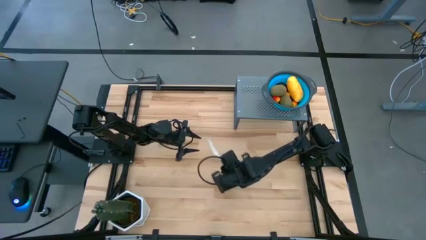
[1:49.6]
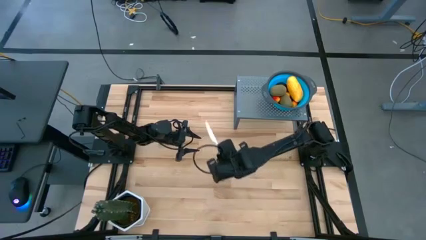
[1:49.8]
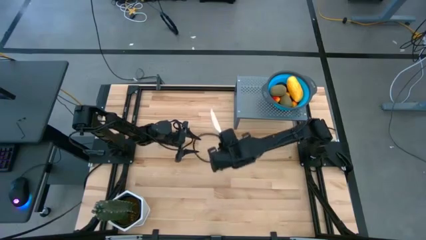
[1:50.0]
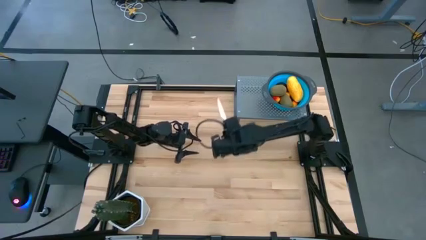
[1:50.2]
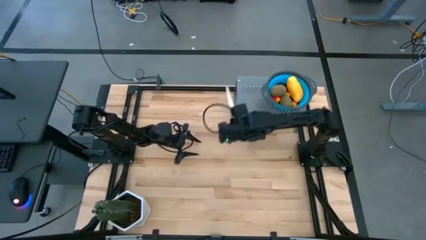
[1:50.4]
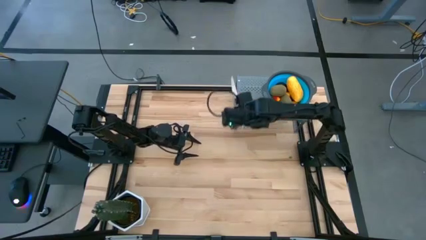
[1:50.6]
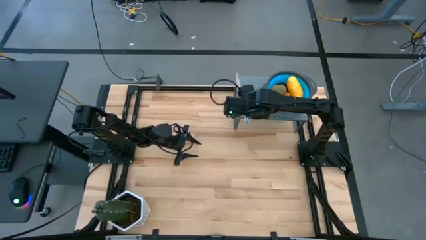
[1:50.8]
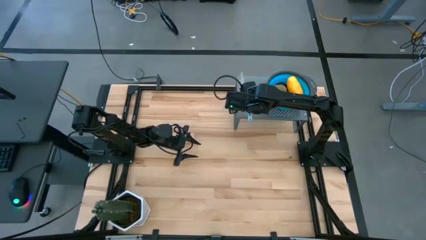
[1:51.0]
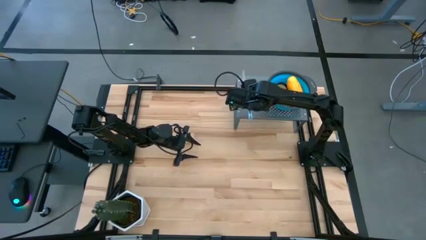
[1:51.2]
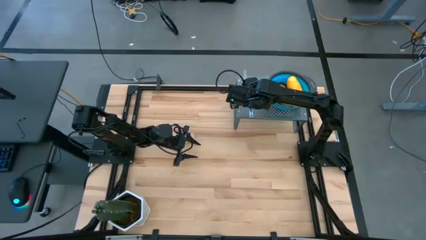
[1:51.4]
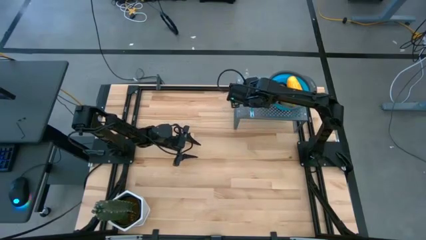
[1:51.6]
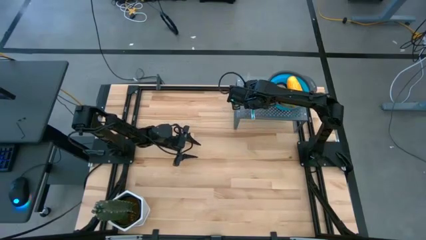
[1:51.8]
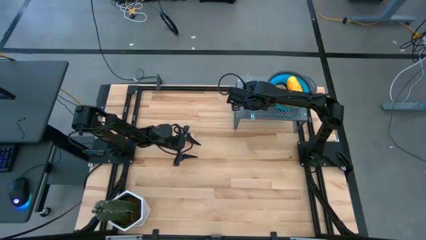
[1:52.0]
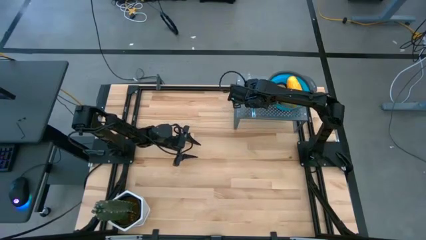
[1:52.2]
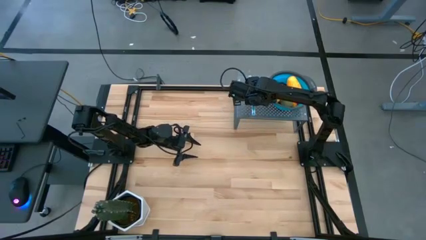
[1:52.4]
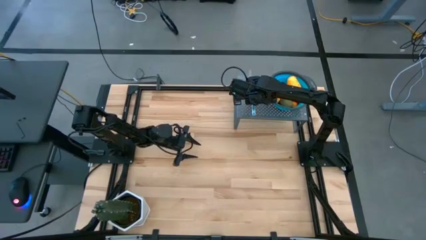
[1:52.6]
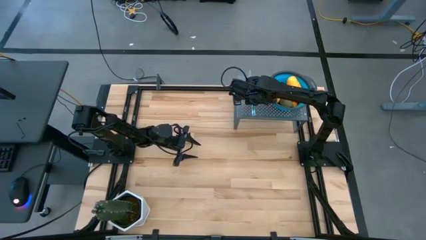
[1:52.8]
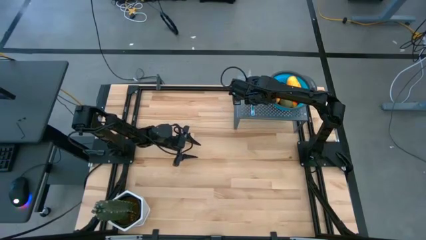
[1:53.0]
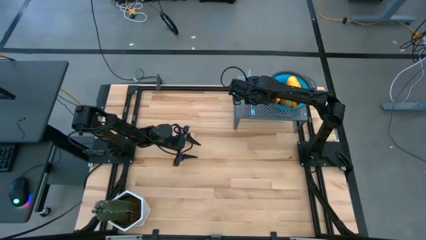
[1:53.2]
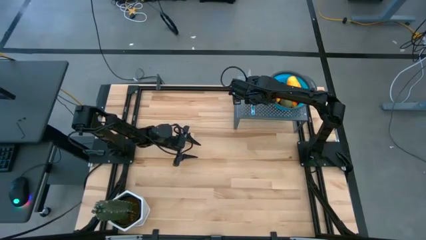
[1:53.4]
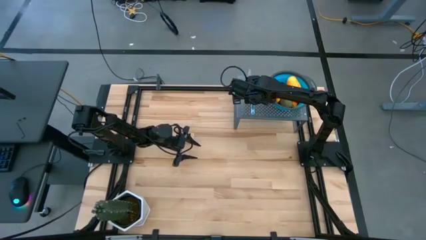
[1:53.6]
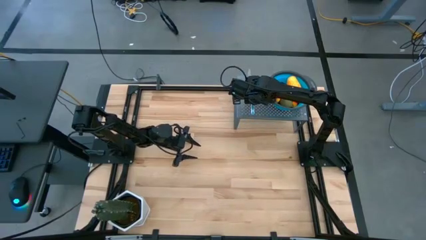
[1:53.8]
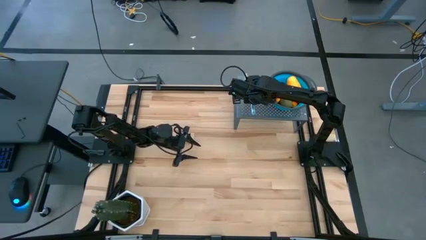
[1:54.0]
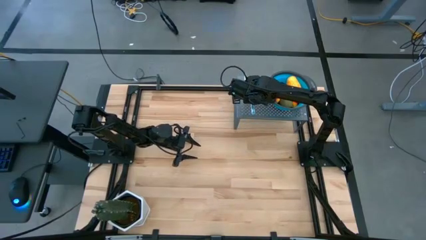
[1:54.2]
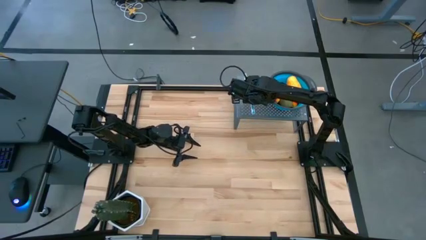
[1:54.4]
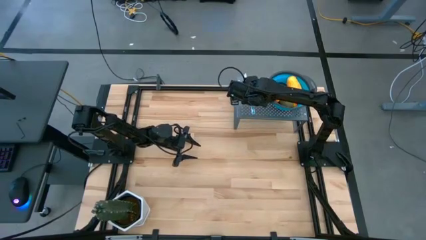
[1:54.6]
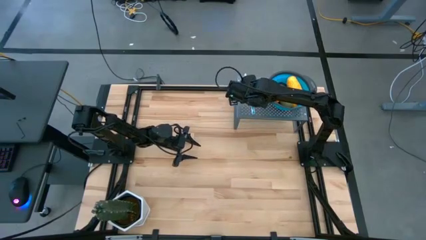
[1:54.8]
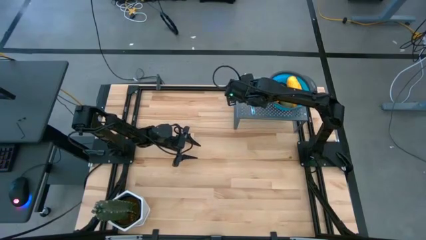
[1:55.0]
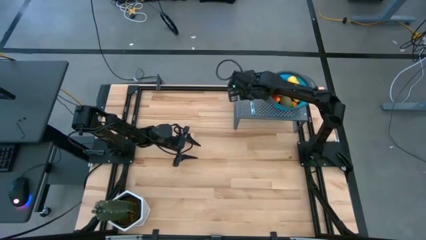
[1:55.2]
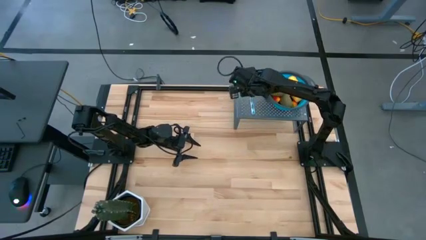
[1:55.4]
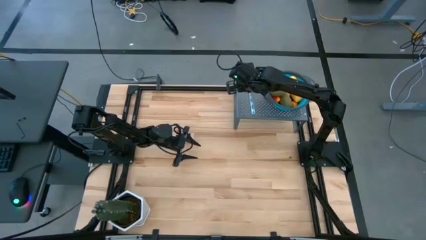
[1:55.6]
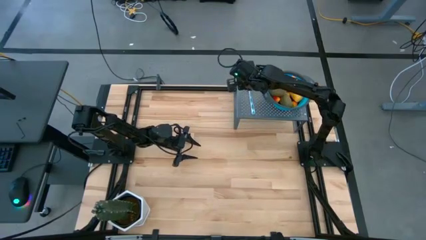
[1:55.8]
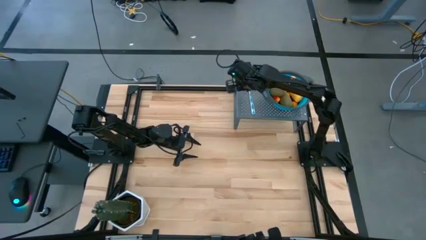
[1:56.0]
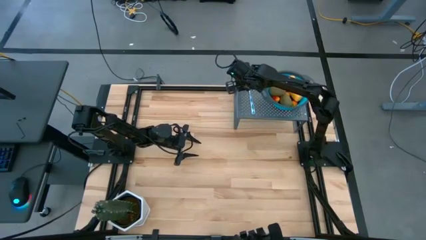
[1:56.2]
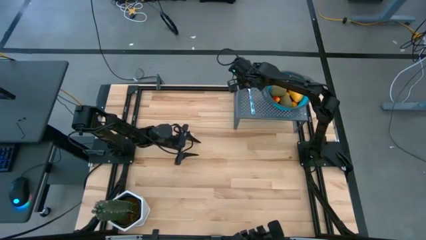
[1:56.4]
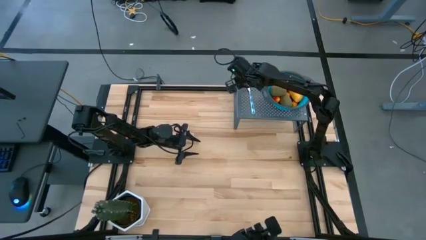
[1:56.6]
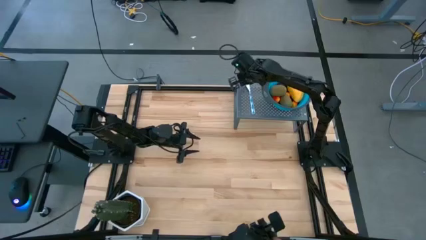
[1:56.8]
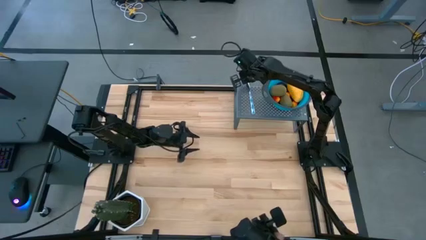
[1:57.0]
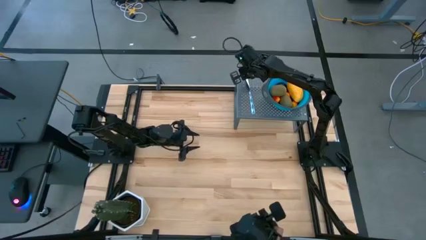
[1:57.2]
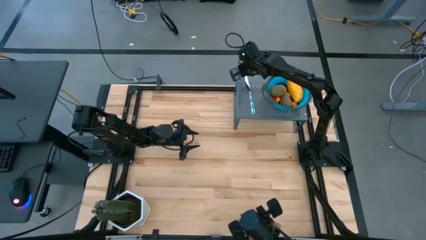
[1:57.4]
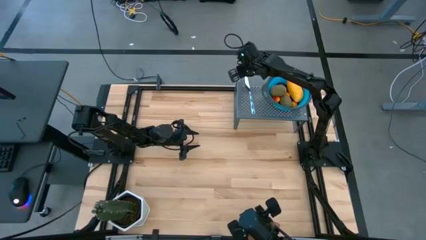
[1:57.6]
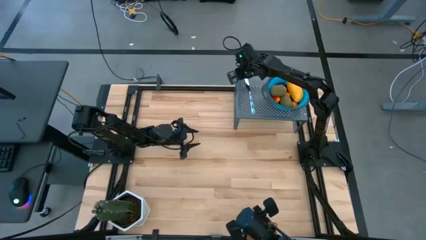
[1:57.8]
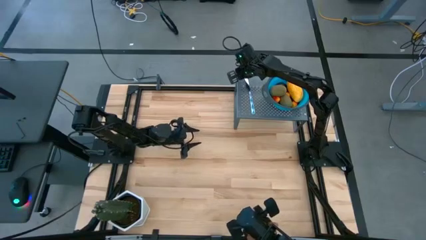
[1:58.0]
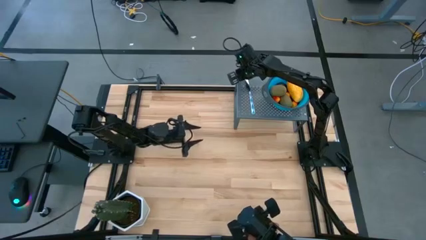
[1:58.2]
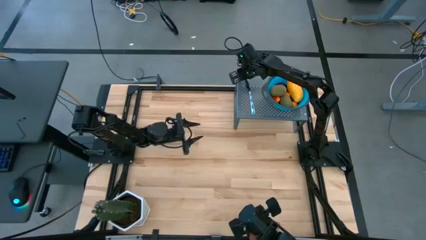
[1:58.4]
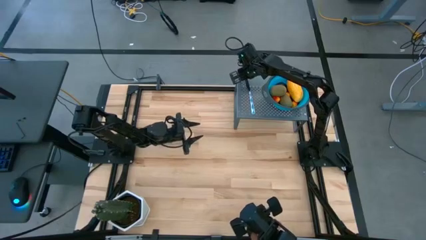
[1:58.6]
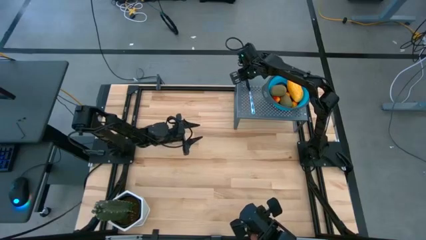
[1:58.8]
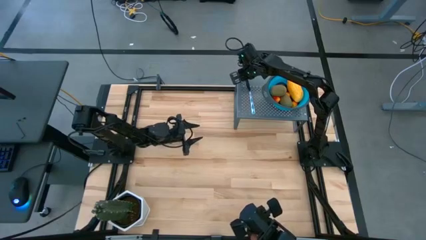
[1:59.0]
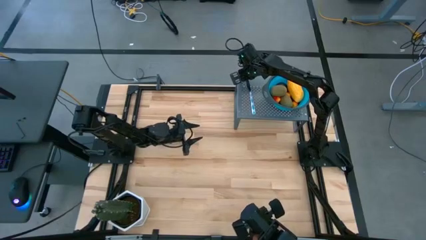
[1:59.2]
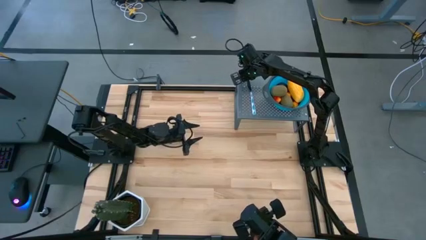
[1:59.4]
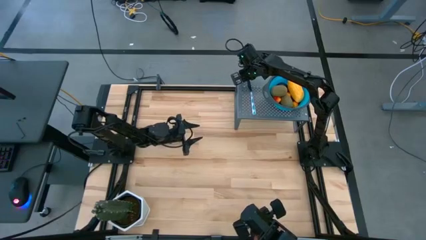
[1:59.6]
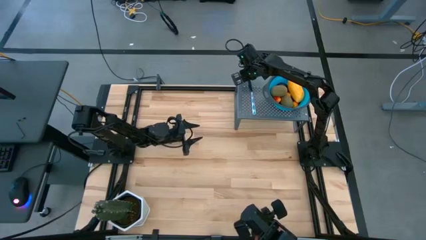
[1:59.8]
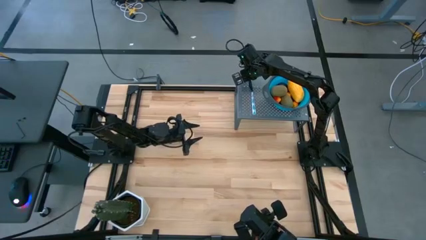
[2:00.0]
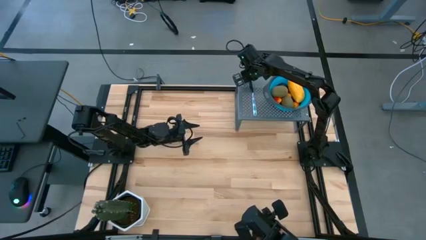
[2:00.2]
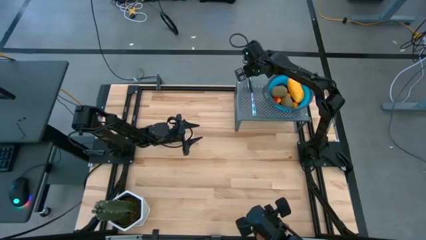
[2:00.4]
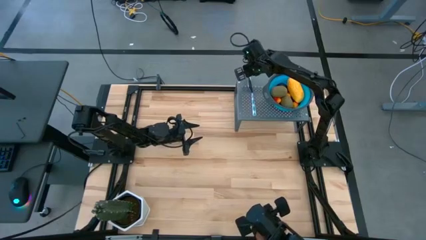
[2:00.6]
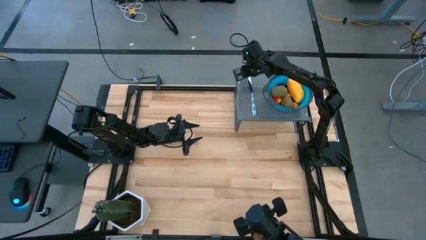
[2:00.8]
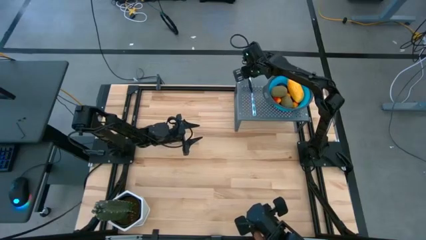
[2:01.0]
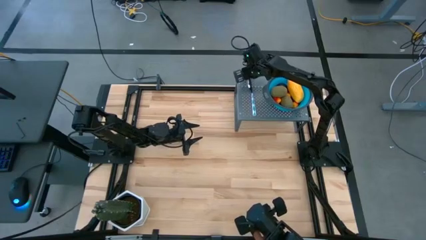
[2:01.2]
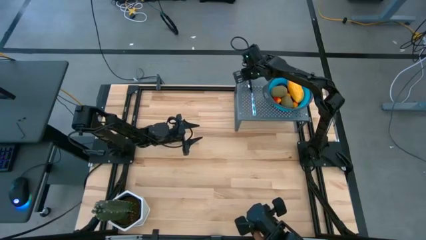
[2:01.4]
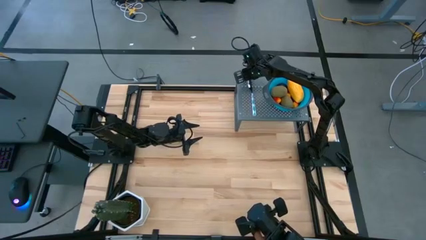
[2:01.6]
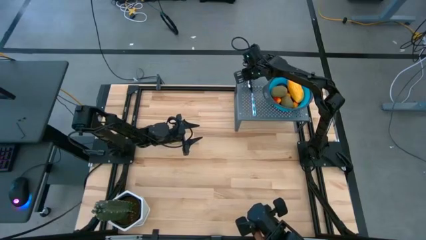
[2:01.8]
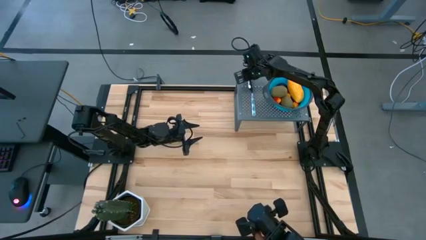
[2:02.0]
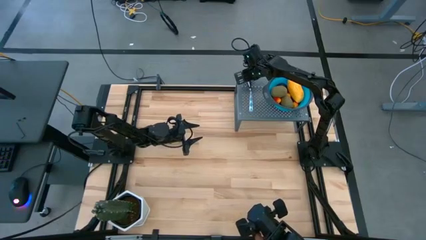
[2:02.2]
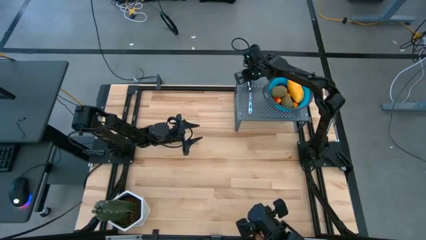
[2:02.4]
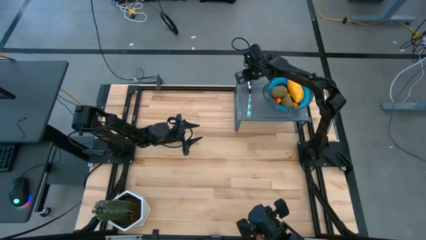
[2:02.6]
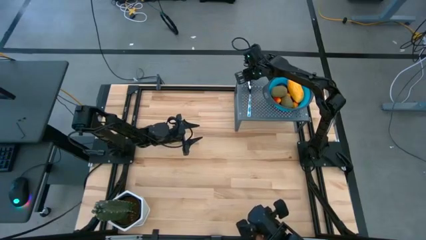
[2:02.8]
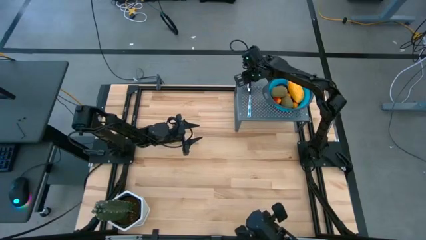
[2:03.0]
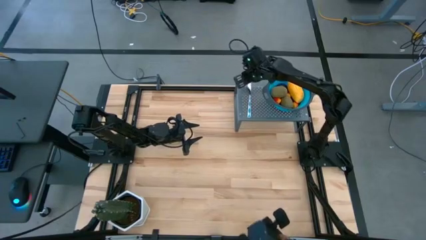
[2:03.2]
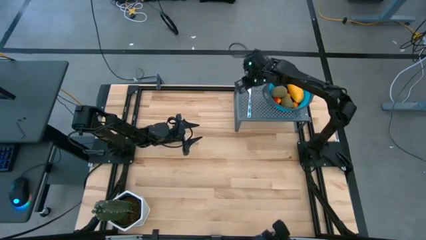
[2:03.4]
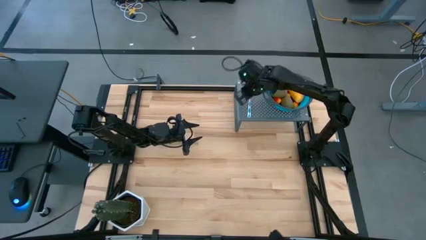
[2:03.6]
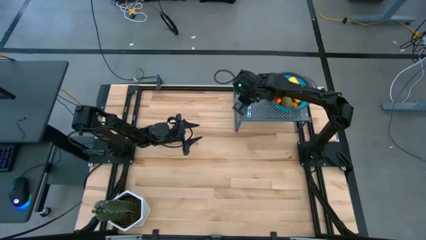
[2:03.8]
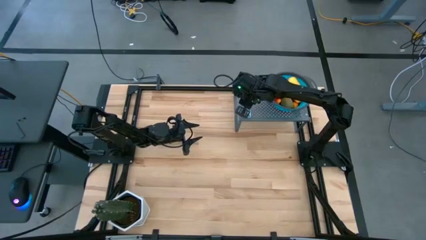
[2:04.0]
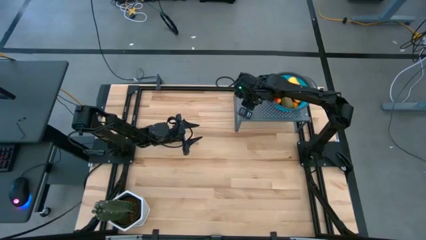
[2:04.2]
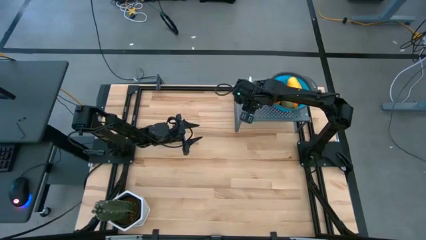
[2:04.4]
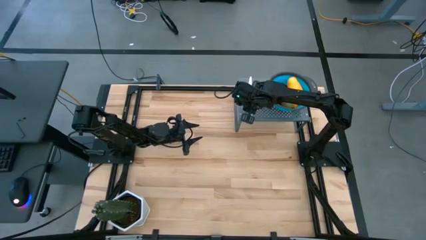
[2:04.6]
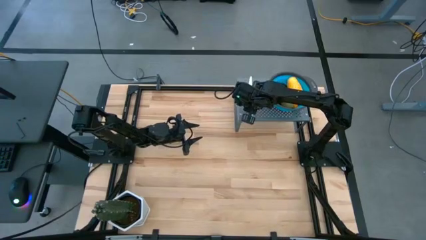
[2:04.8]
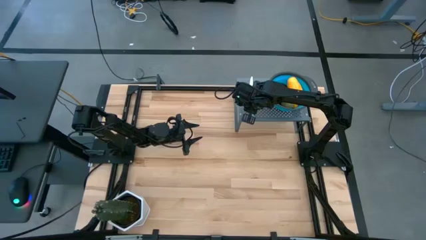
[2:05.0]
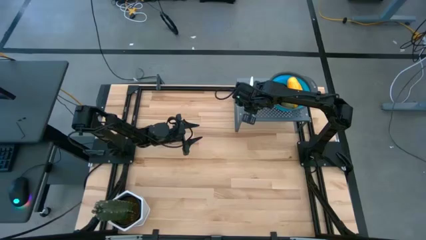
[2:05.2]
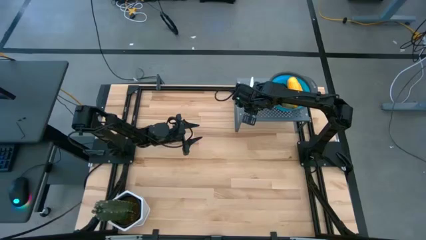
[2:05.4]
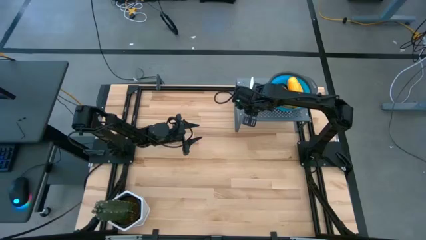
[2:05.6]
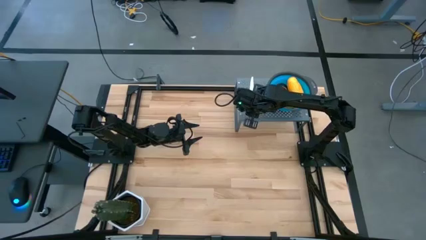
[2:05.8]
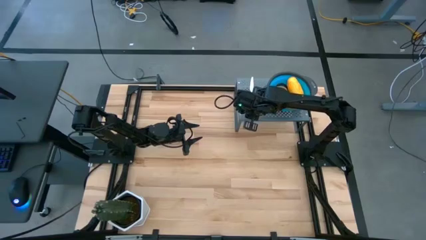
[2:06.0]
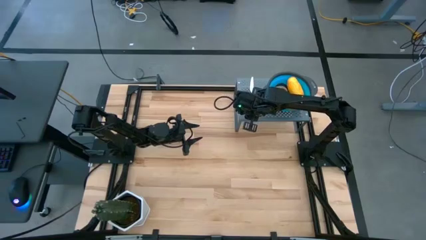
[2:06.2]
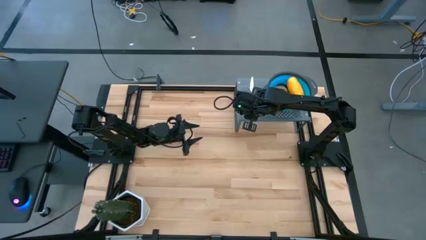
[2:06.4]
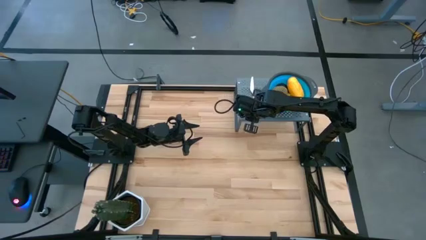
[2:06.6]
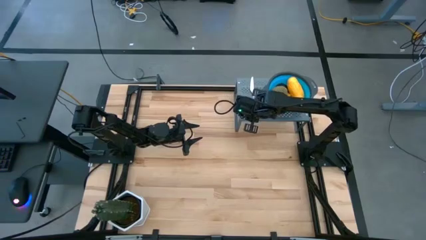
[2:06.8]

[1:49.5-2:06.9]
Task: Pick & Place Fruit
Put the blue table knife on the shelf
